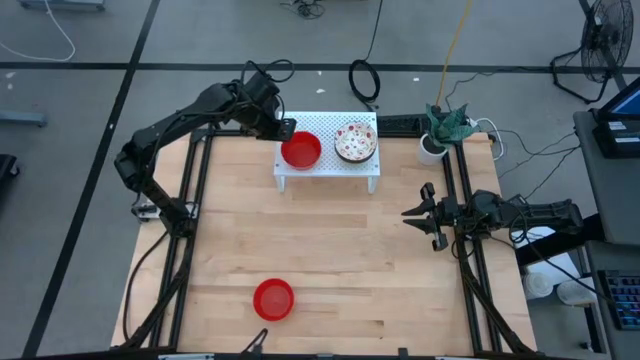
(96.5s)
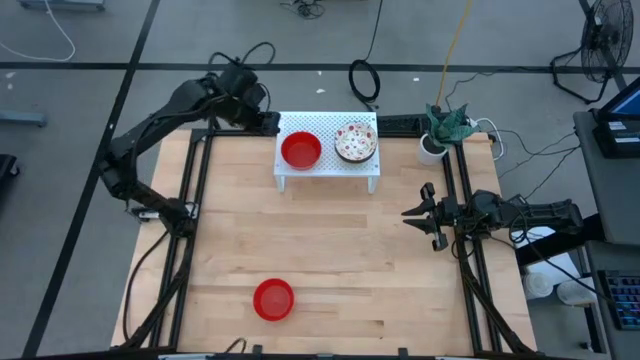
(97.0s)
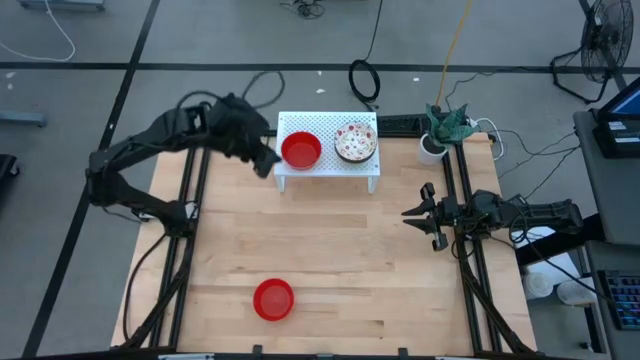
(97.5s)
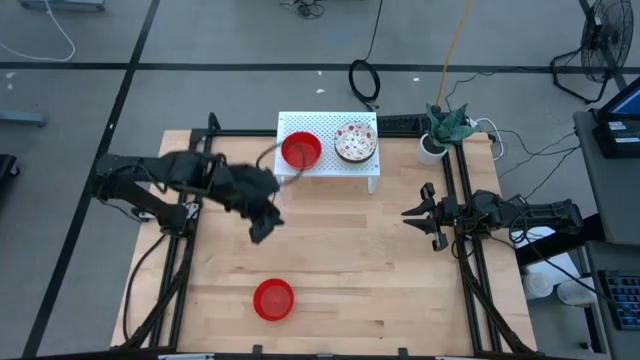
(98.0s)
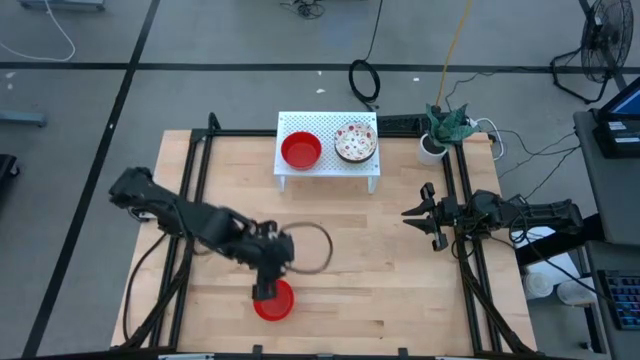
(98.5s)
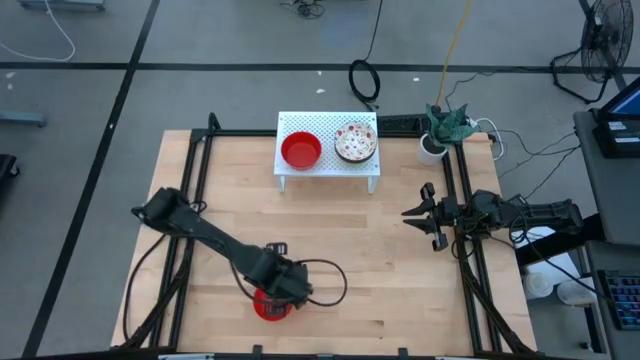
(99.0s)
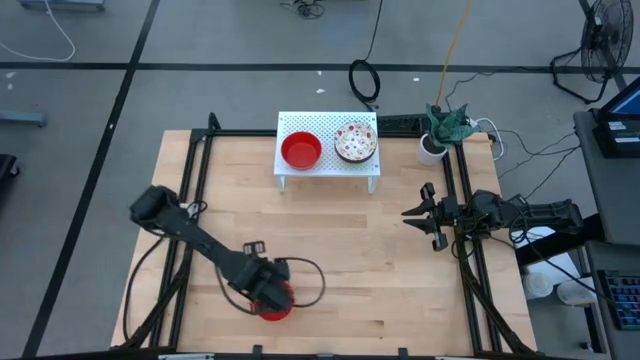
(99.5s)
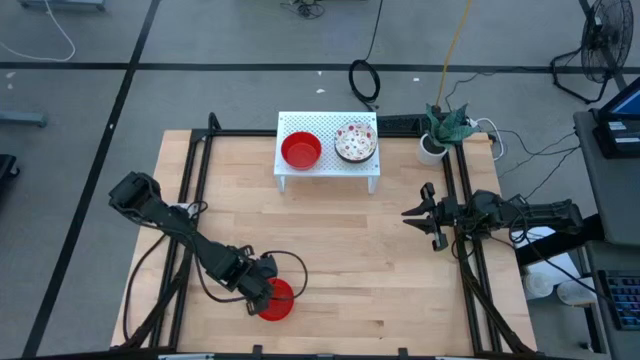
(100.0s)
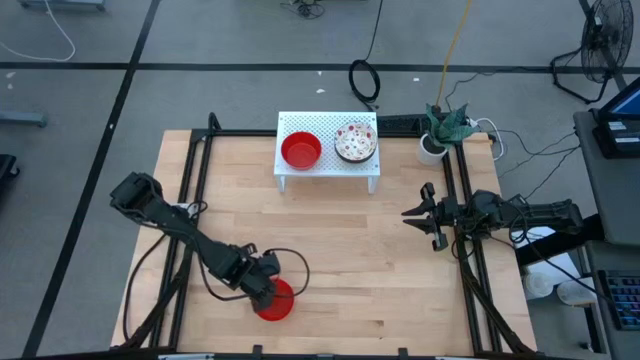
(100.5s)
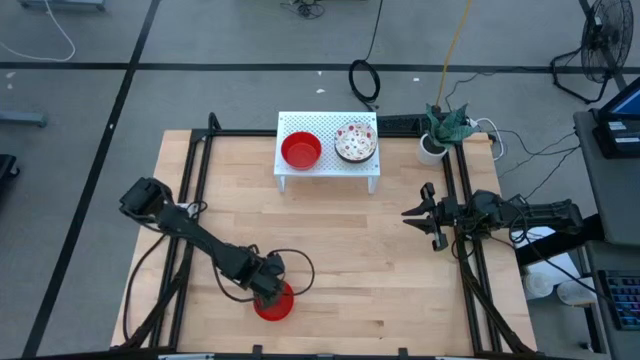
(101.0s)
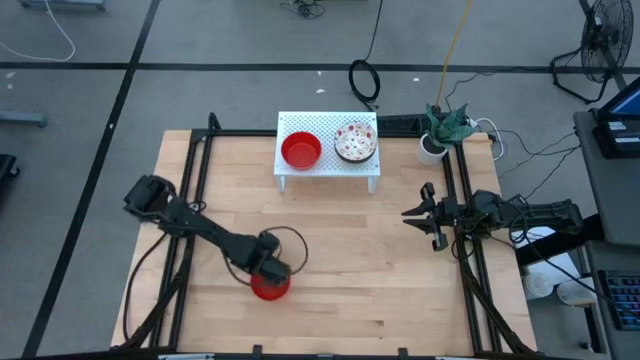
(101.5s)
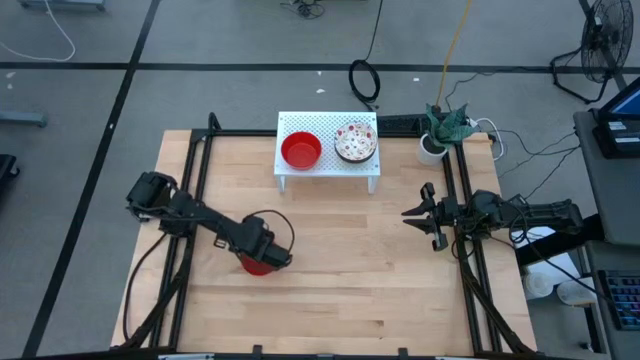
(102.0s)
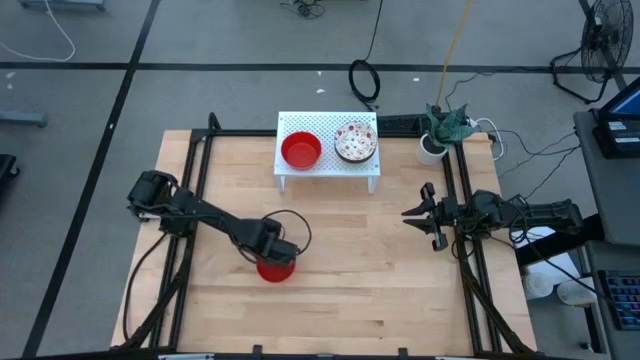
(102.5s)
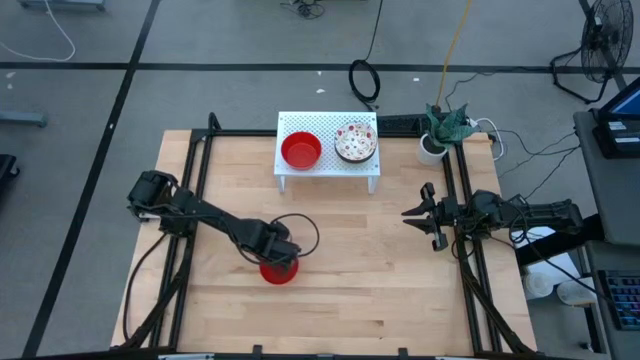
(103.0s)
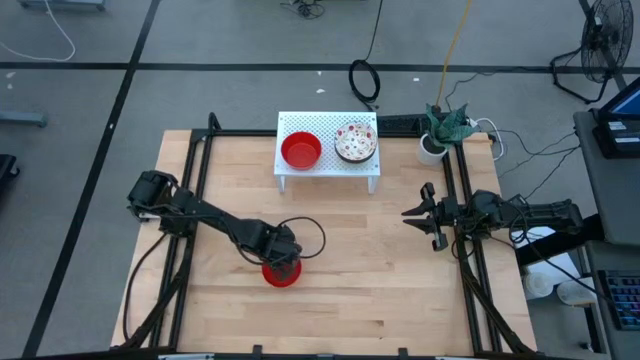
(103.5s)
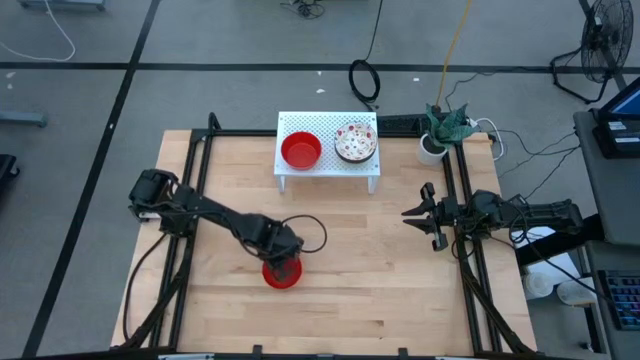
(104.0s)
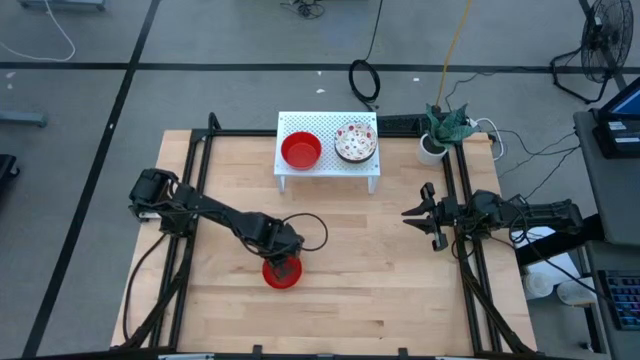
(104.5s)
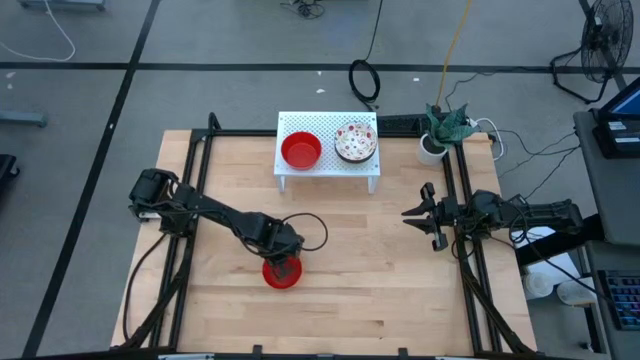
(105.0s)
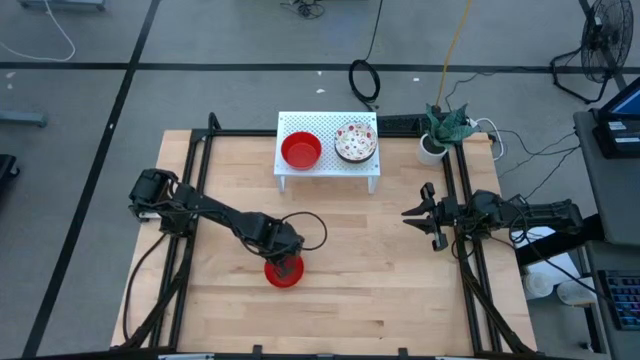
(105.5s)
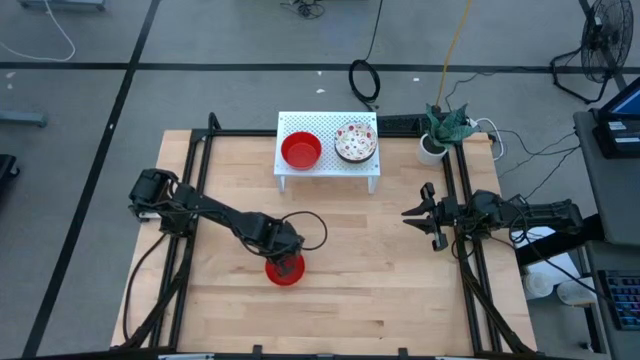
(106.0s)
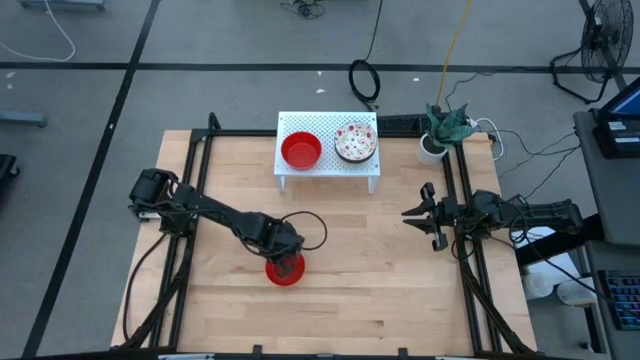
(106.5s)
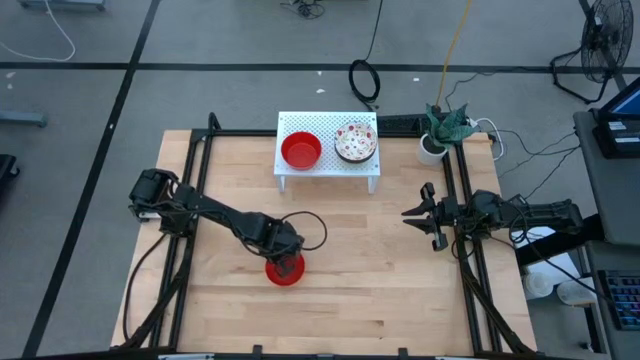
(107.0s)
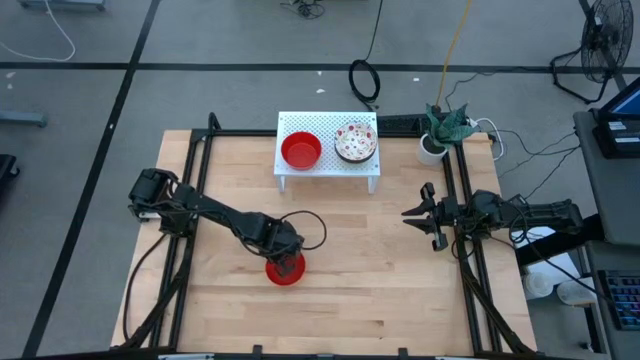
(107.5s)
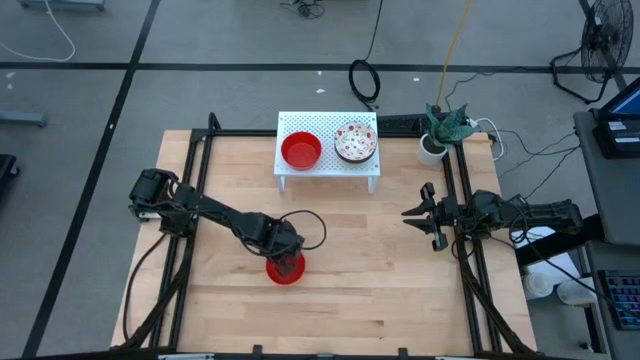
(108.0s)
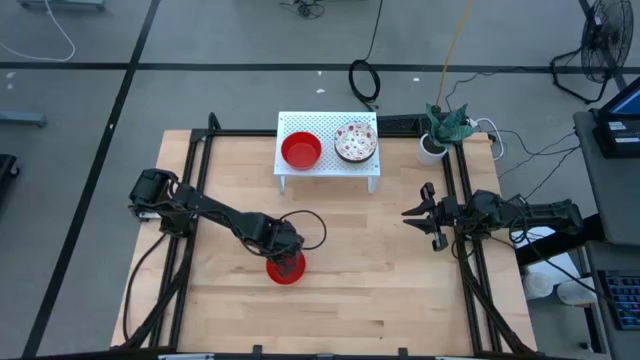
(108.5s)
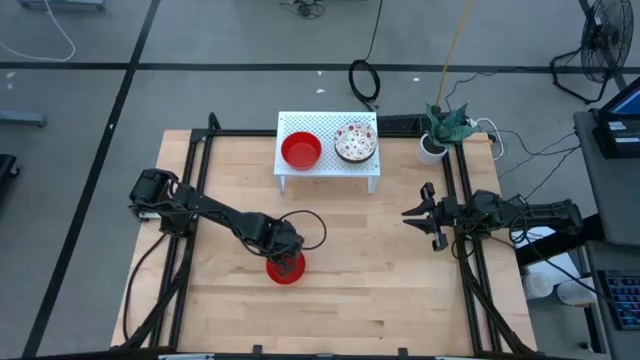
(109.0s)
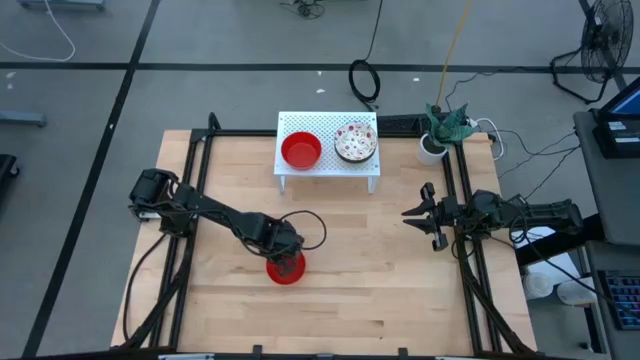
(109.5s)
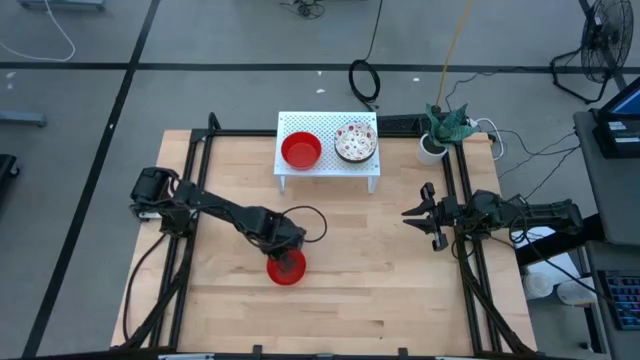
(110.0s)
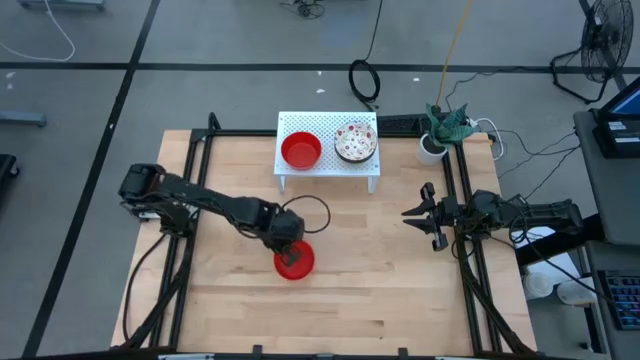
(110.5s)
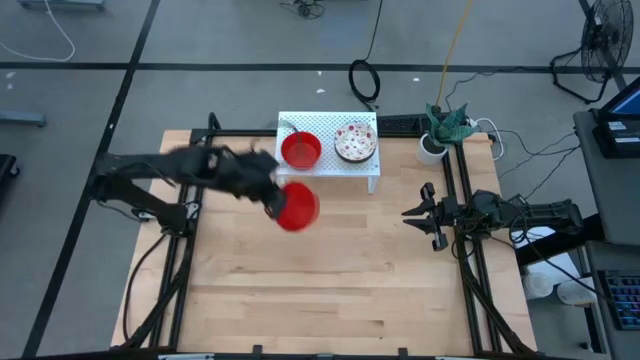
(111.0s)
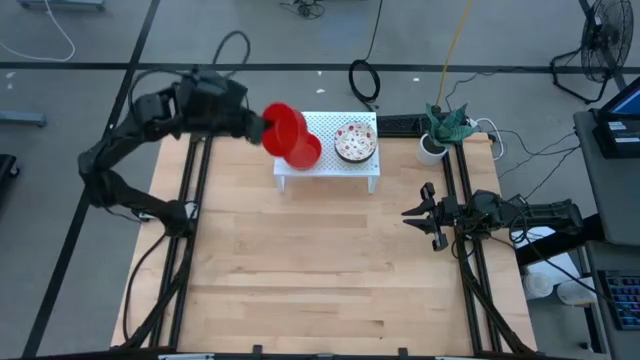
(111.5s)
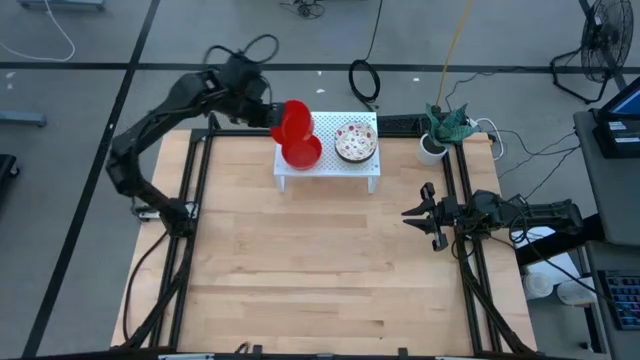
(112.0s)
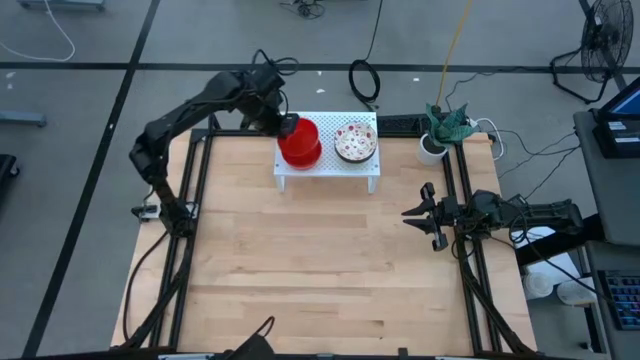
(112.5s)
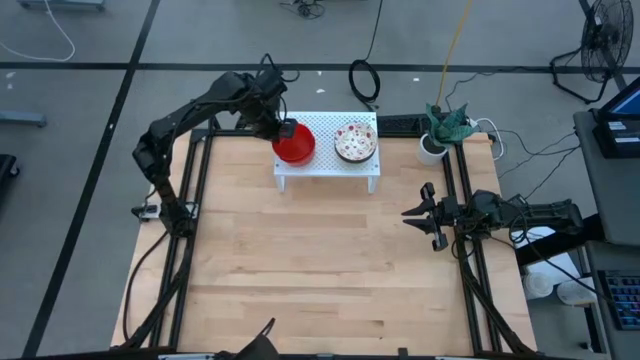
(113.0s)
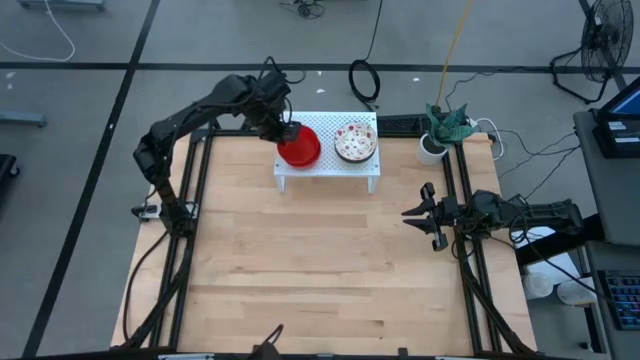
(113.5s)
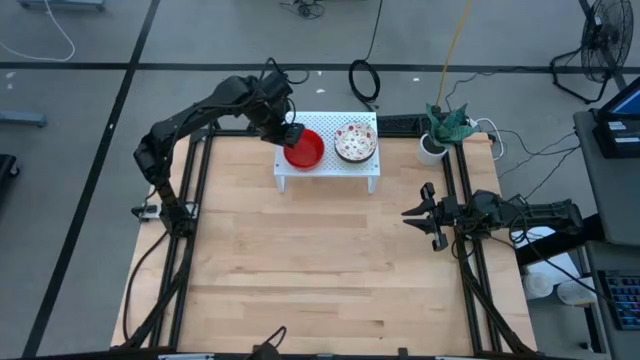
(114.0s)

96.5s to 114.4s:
Task: Pick & Place Mini bowls
Stack the red bowl on the red bowl on the shelf
